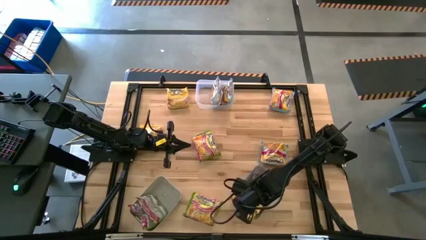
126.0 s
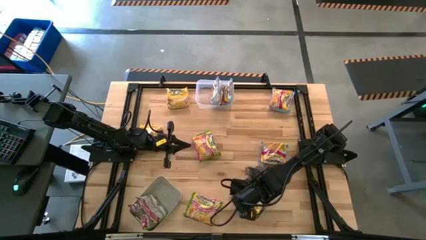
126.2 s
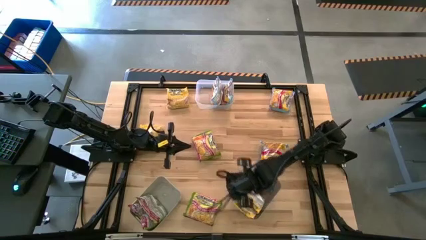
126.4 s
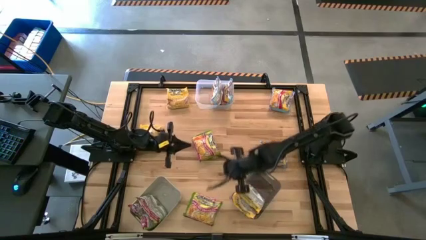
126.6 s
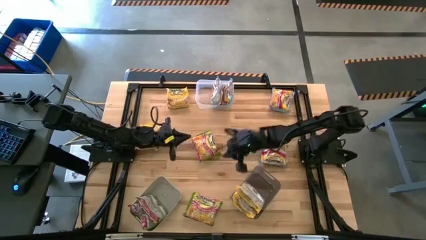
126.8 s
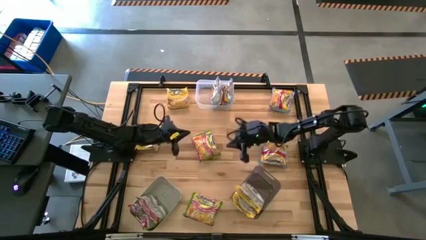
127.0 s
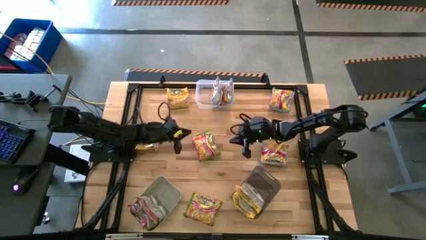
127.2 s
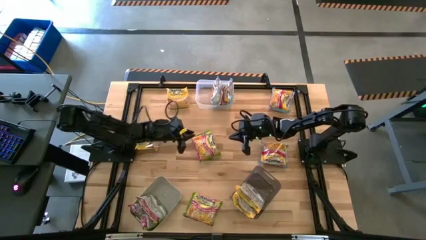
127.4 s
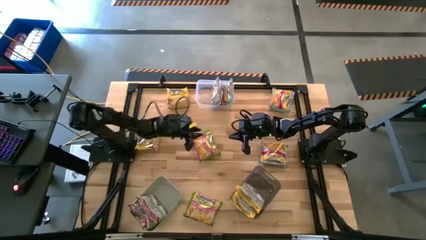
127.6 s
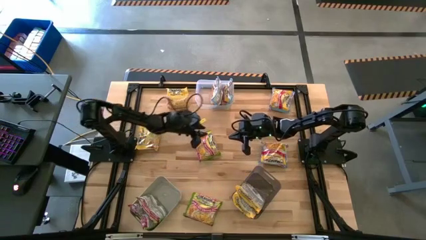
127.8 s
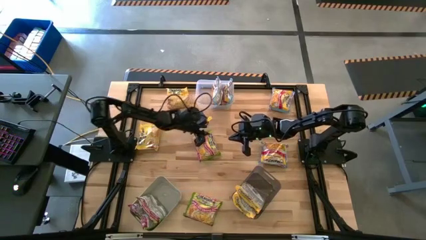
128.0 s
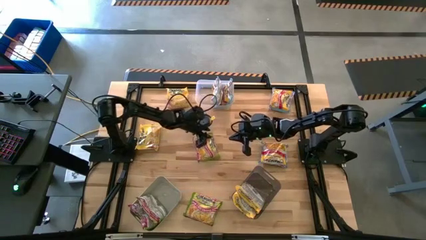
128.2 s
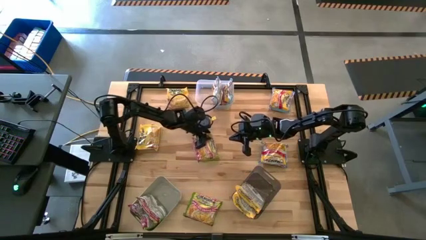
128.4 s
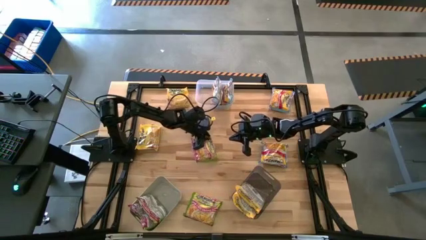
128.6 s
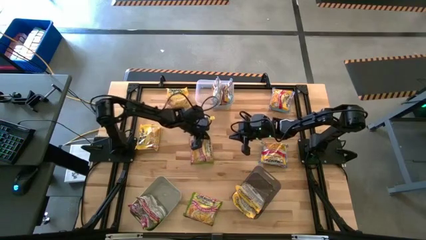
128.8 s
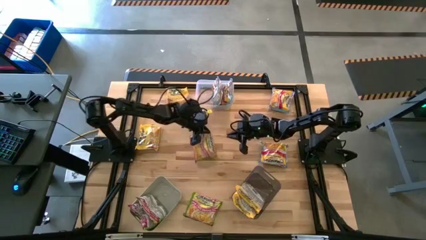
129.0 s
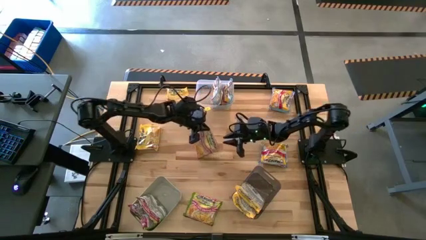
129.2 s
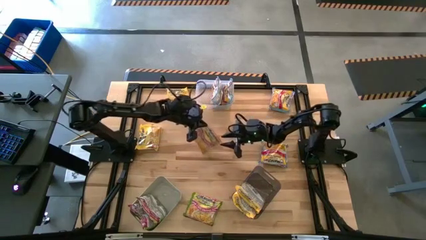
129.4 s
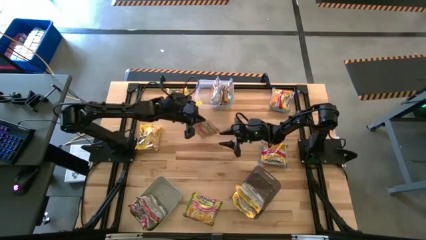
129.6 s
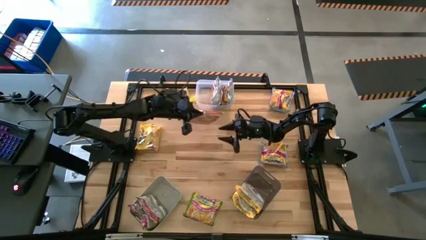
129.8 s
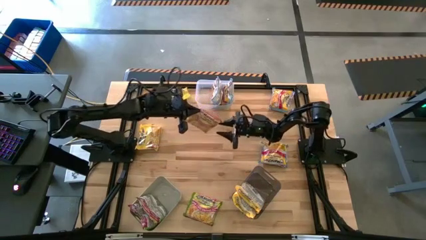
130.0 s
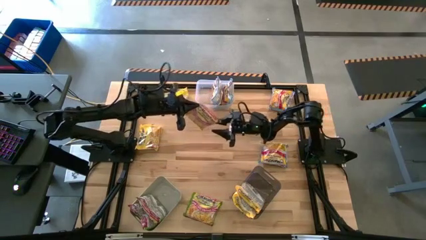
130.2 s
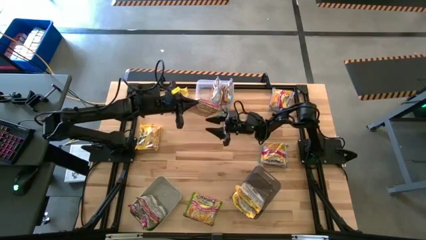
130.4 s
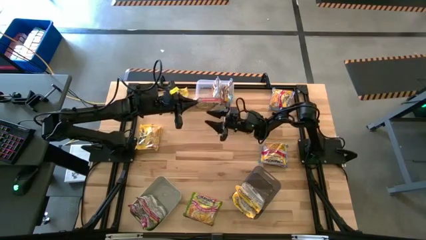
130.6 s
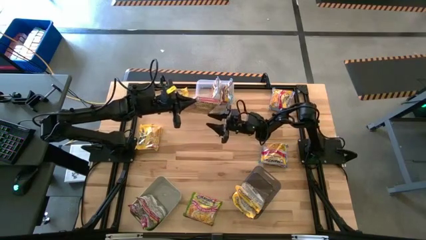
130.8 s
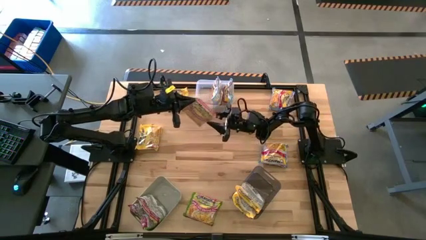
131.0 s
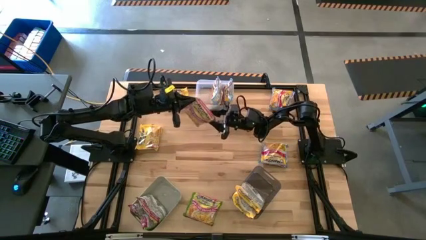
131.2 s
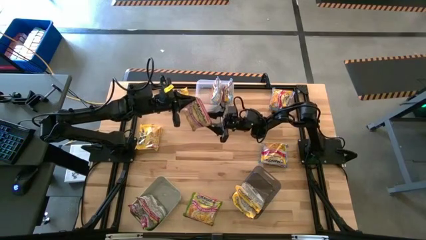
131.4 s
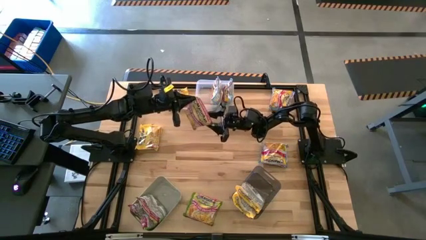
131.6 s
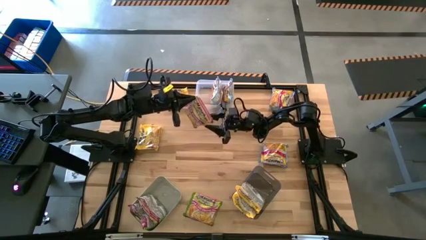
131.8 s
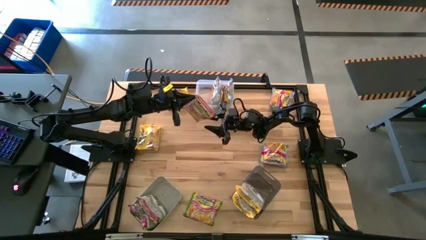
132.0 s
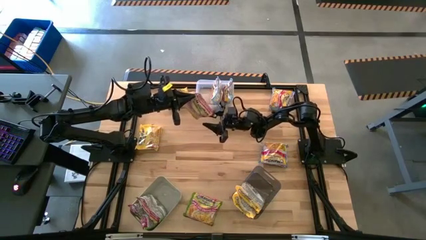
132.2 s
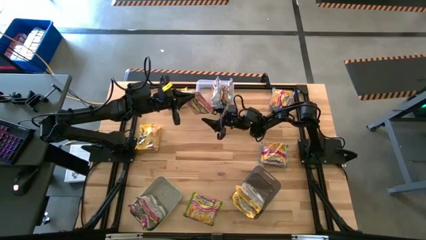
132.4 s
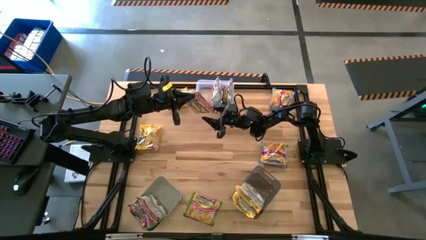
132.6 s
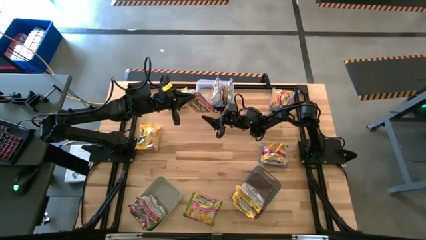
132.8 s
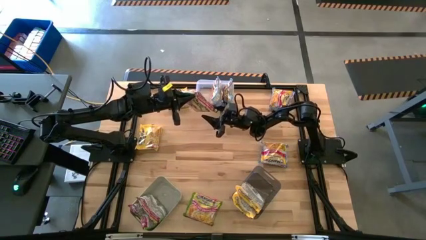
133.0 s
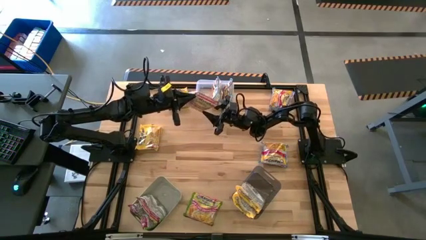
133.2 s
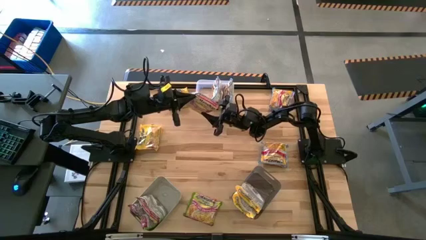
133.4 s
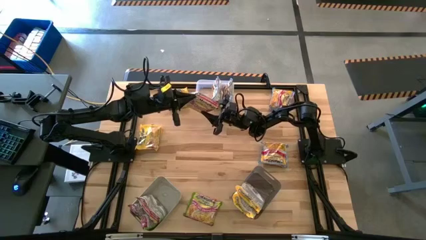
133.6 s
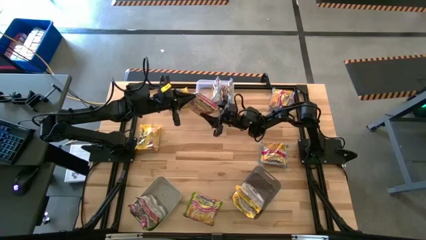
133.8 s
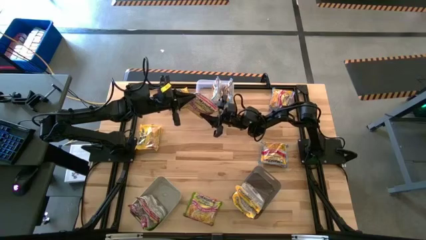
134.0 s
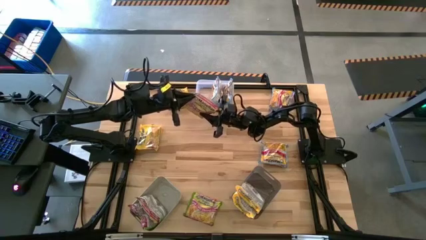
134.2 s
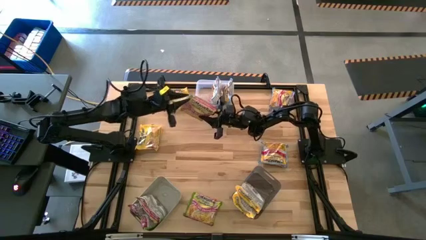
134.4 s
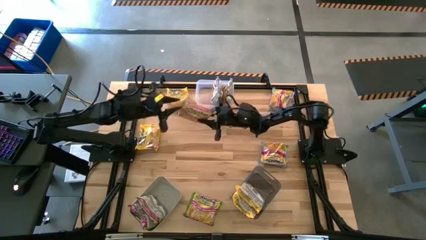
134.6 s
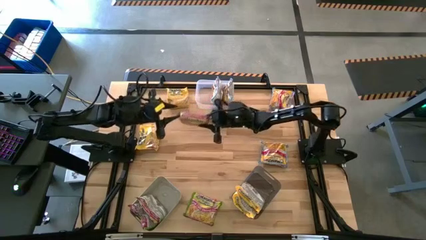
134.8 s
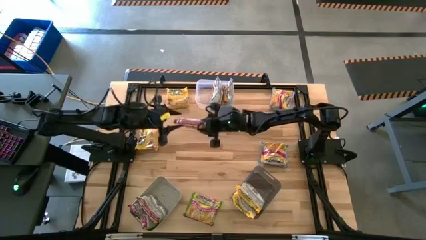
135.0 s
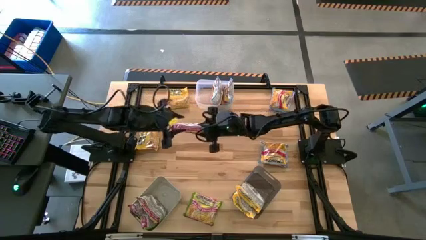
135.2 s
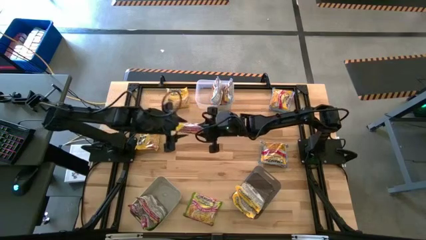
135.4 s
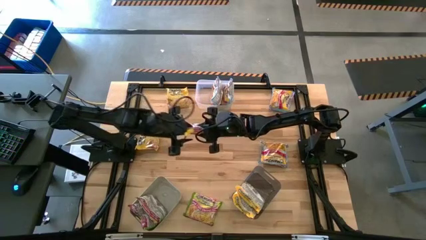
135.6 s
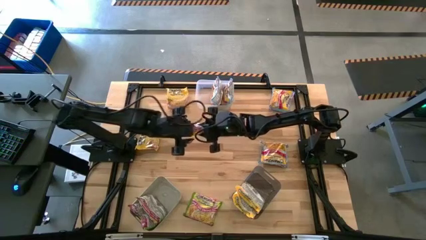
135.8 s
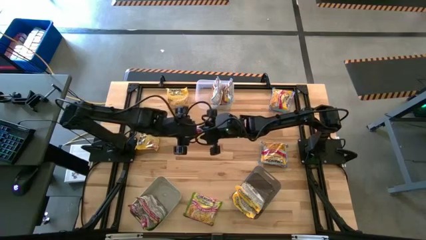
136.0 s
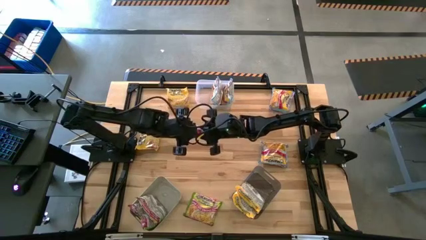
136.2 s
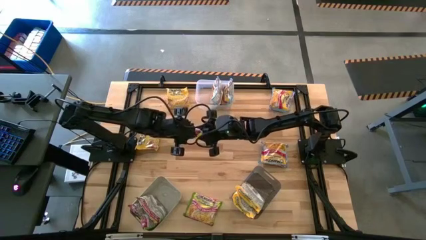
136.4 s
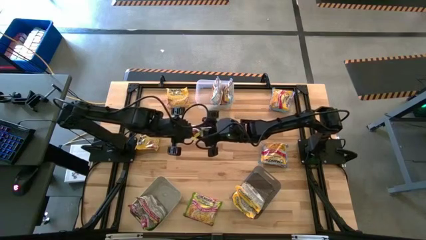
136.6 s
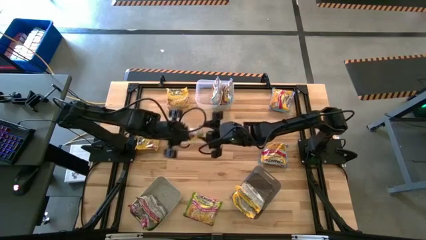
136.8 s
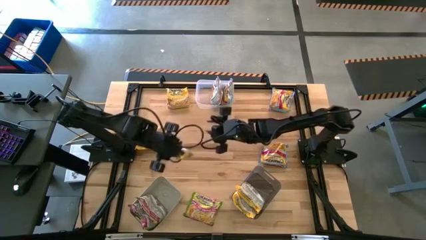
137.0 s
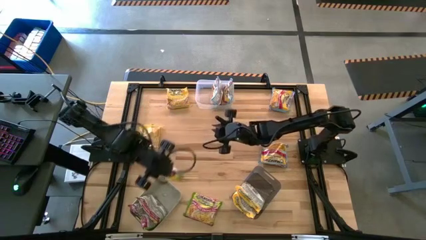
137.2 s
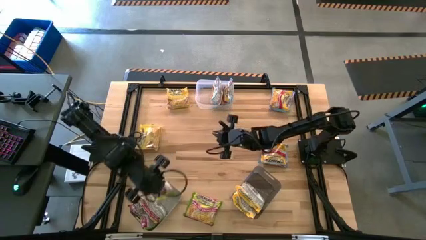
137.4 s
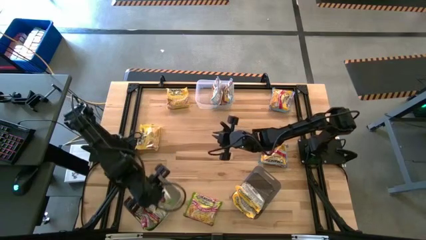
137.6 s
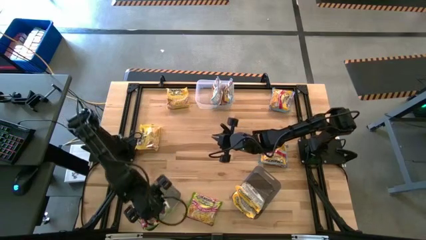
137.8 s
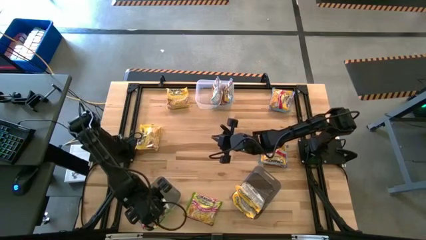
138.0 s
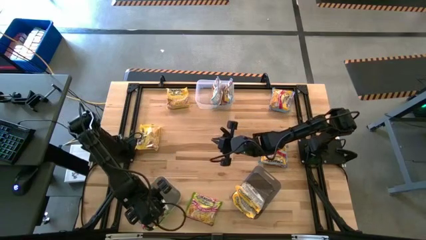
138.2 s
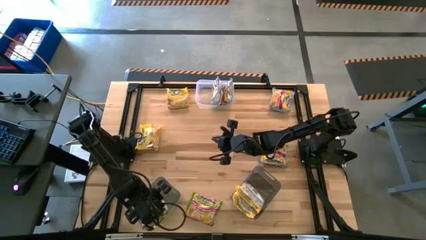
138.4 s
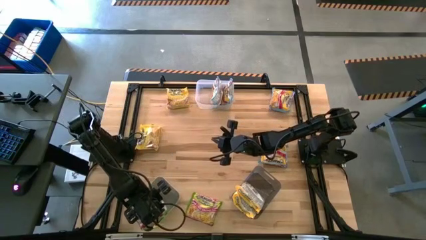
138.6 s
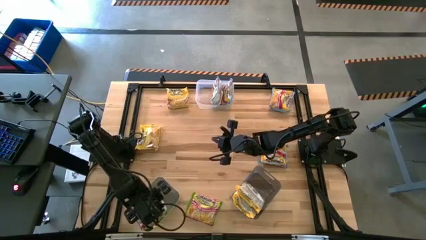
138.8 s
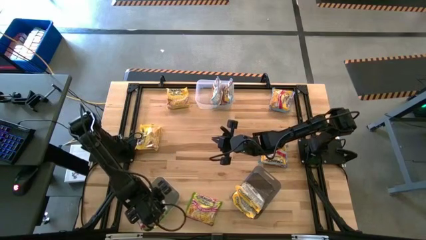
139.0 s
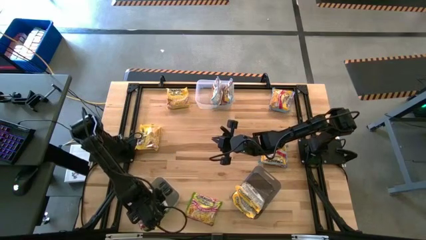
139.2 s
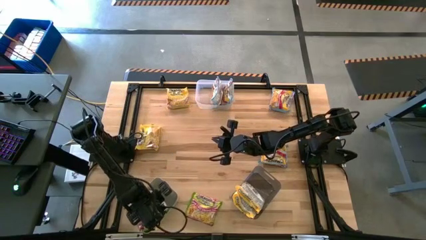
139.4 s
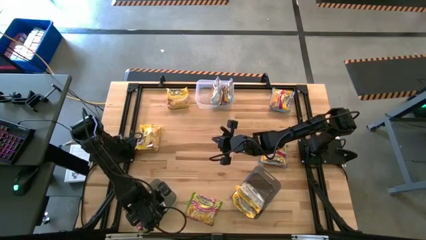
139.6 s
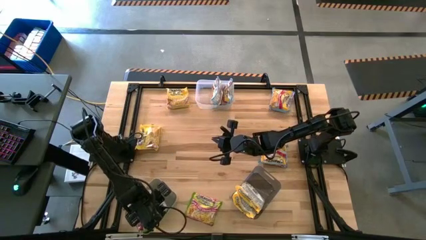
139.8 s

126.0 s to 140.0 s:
Task: Sort Maruchan noodles
Put the green noodle pack into the gray bin

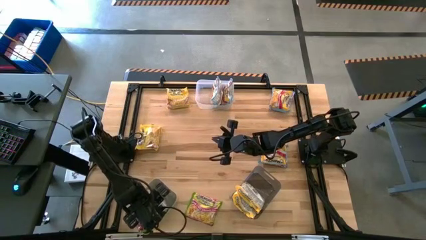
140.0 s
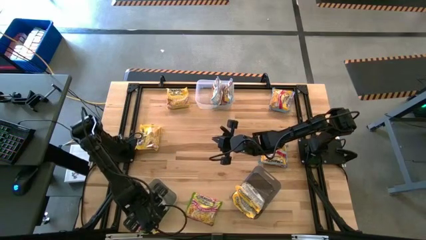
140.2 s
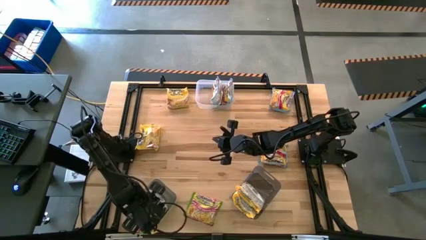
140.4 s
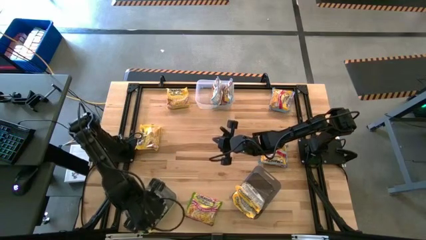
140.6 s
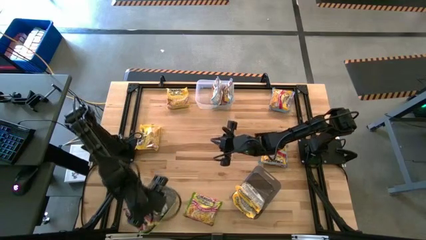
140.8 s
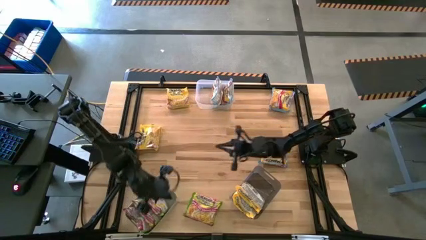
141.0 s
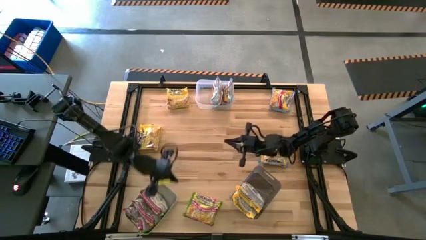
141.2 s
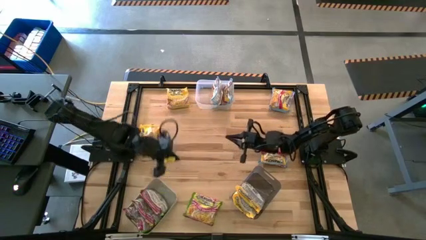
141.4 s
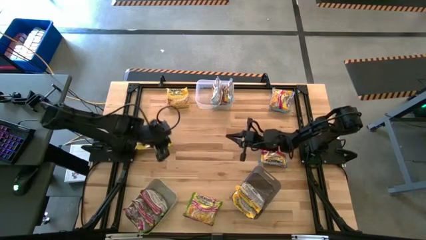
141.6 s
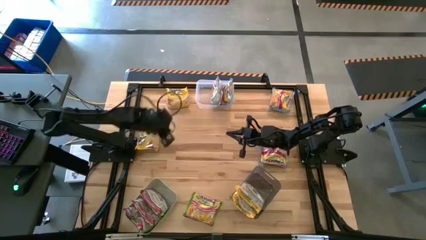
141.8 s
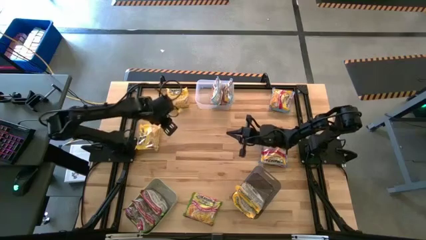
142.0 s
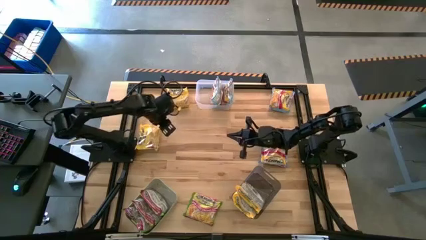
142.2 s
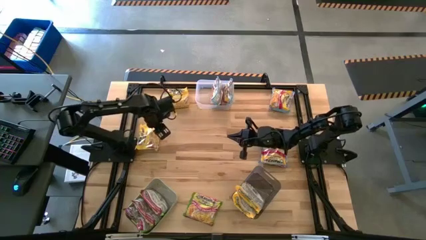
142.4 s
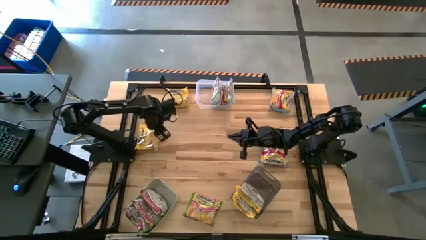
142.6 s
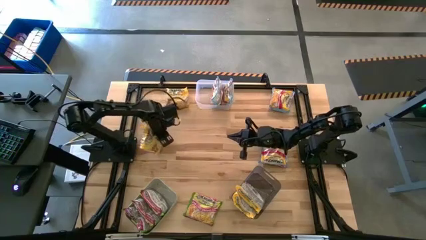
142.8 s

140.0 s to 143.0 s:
Put the yellow noodle pack into the black bin
